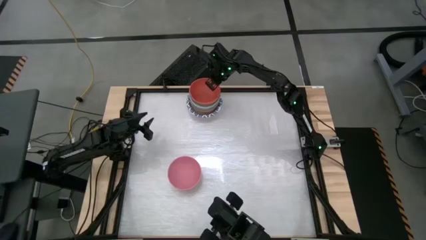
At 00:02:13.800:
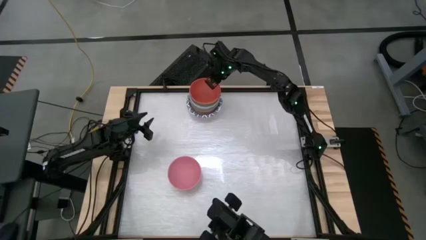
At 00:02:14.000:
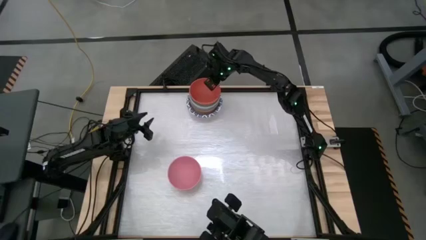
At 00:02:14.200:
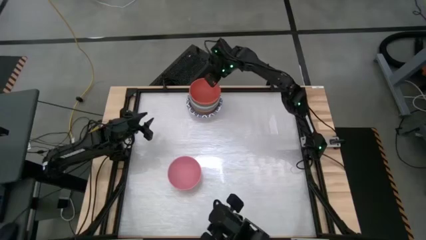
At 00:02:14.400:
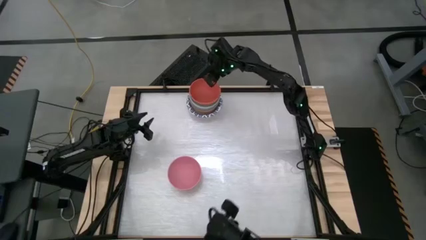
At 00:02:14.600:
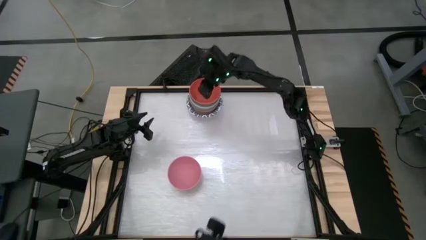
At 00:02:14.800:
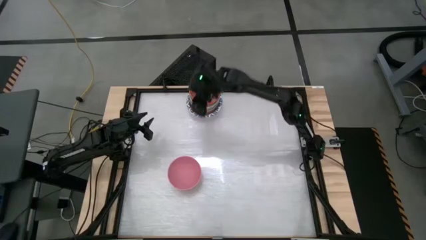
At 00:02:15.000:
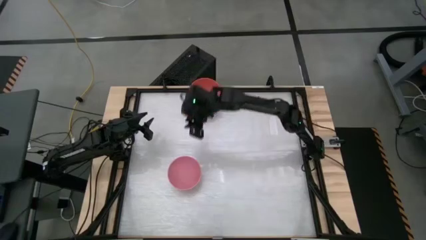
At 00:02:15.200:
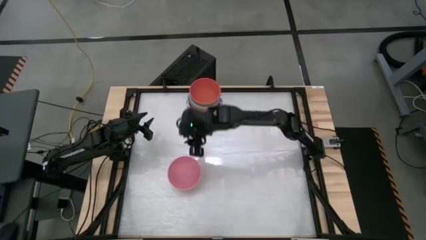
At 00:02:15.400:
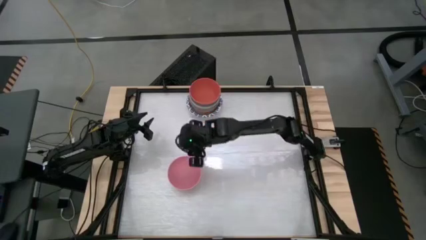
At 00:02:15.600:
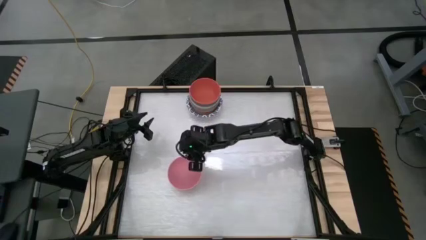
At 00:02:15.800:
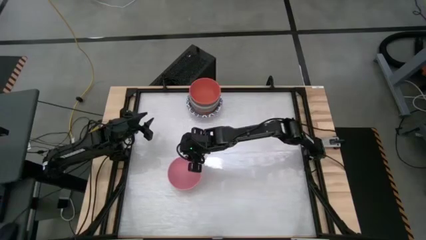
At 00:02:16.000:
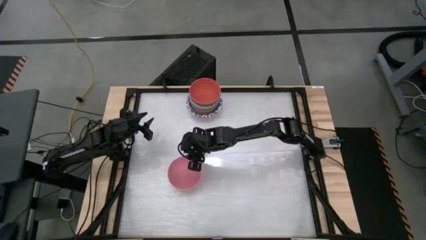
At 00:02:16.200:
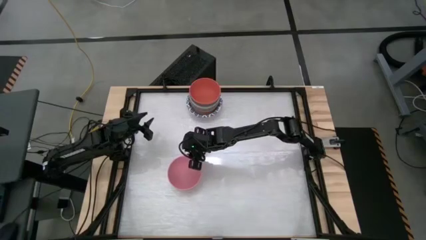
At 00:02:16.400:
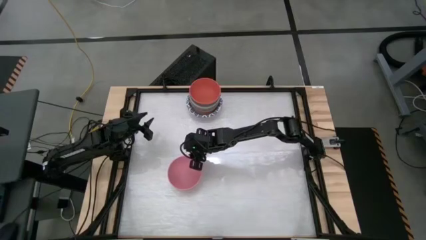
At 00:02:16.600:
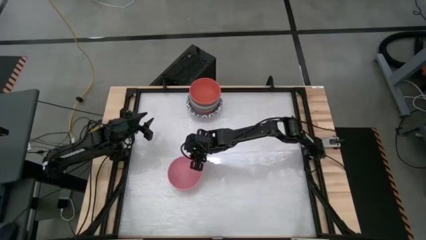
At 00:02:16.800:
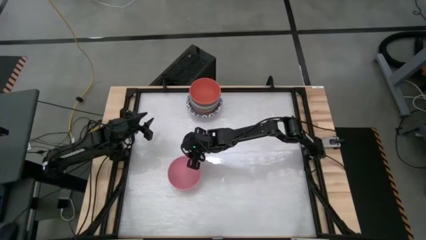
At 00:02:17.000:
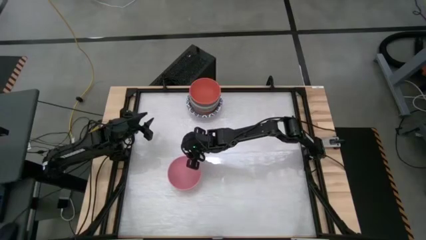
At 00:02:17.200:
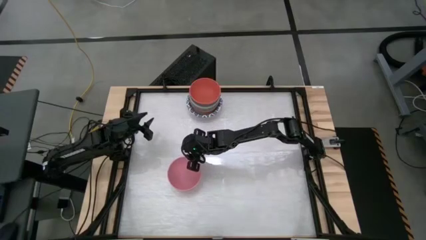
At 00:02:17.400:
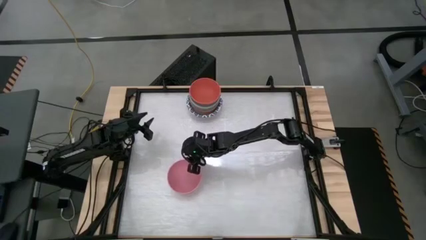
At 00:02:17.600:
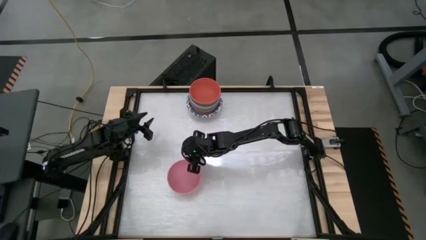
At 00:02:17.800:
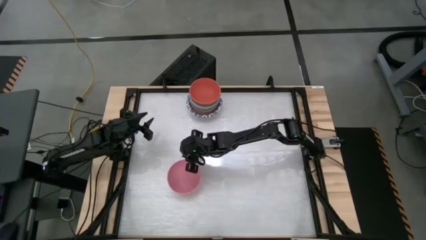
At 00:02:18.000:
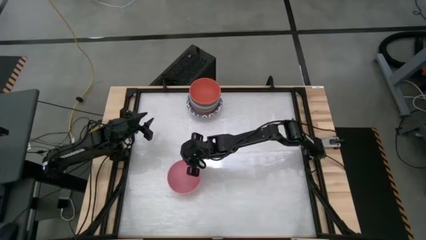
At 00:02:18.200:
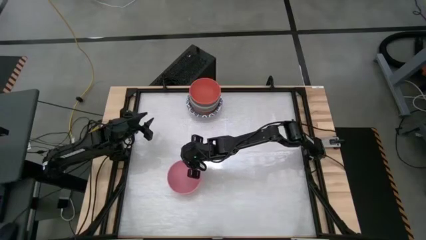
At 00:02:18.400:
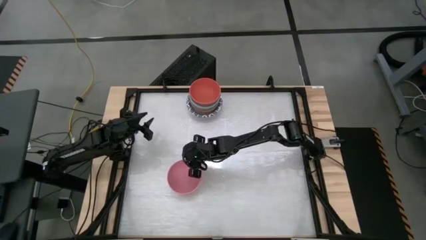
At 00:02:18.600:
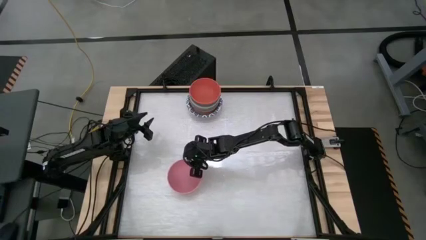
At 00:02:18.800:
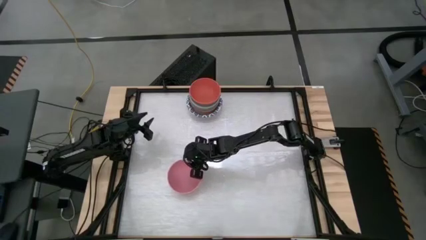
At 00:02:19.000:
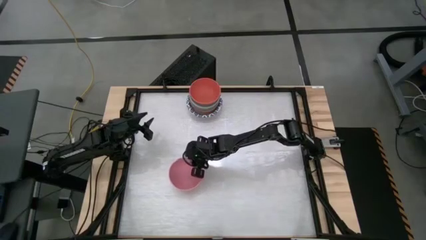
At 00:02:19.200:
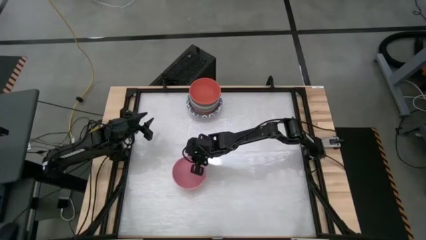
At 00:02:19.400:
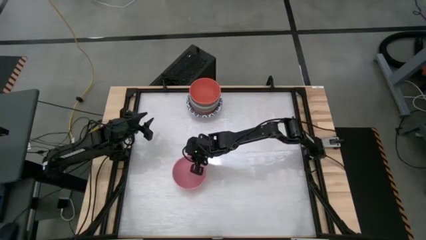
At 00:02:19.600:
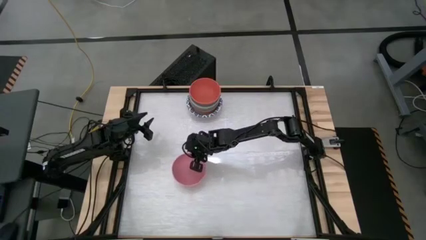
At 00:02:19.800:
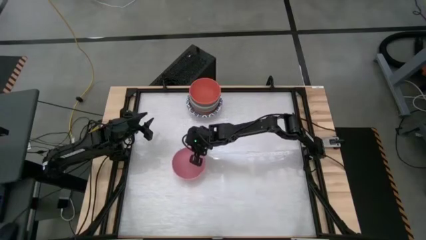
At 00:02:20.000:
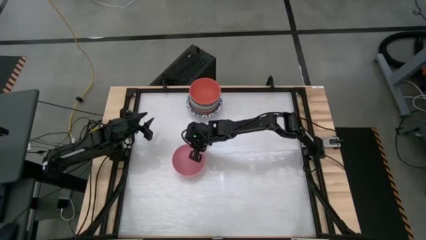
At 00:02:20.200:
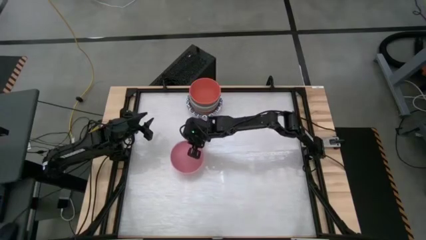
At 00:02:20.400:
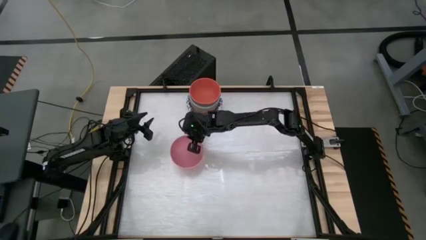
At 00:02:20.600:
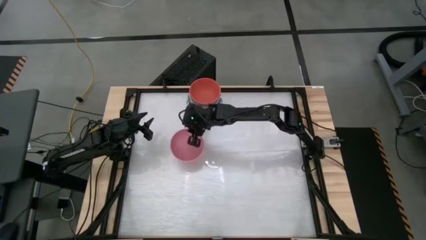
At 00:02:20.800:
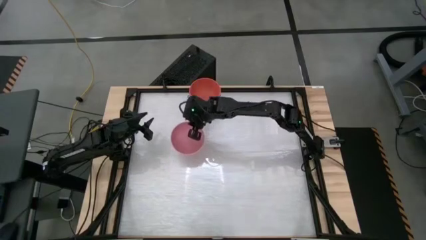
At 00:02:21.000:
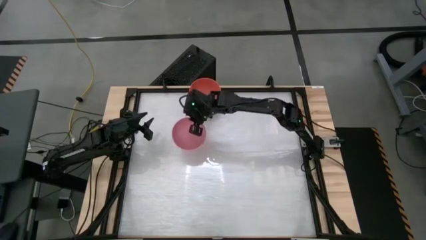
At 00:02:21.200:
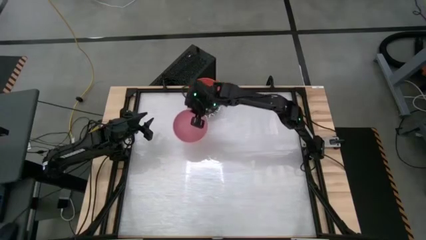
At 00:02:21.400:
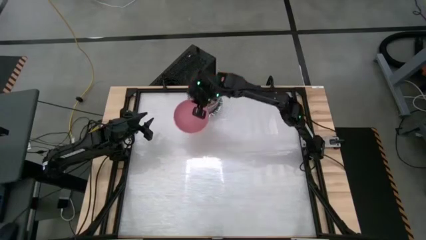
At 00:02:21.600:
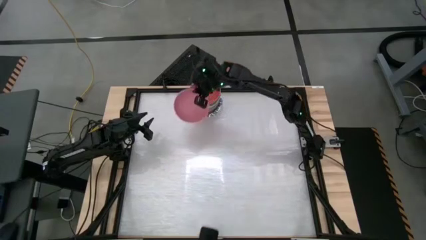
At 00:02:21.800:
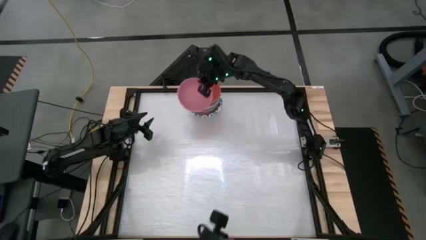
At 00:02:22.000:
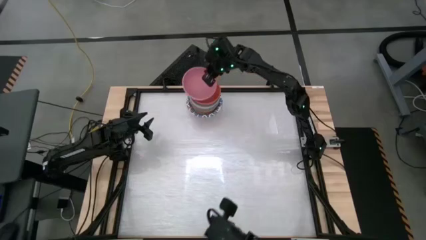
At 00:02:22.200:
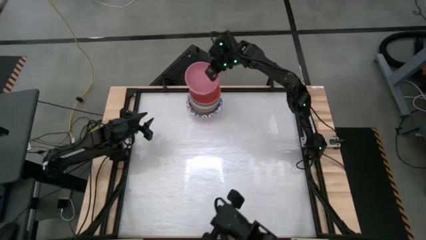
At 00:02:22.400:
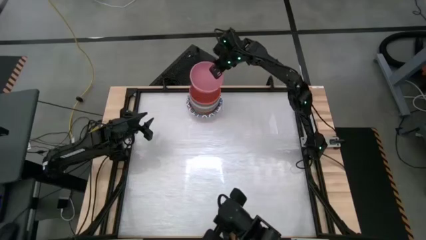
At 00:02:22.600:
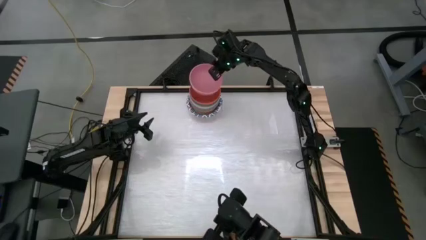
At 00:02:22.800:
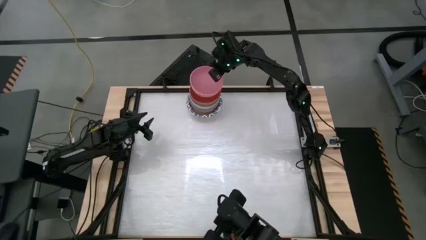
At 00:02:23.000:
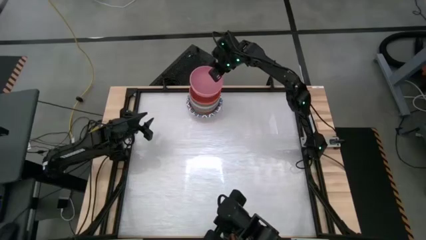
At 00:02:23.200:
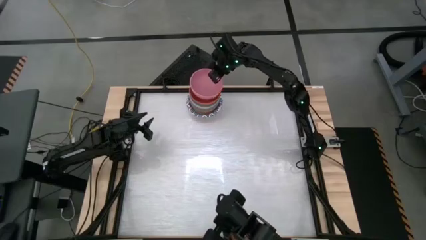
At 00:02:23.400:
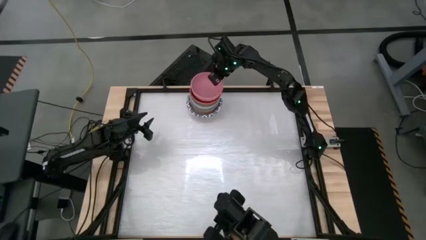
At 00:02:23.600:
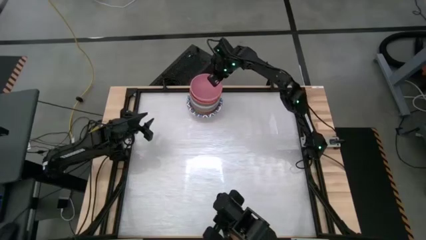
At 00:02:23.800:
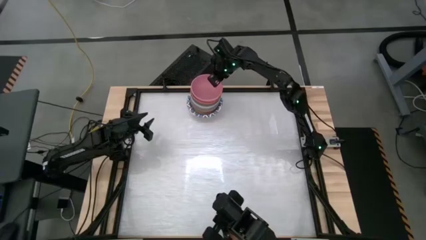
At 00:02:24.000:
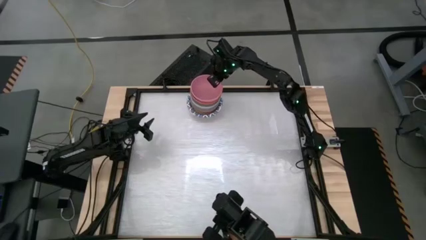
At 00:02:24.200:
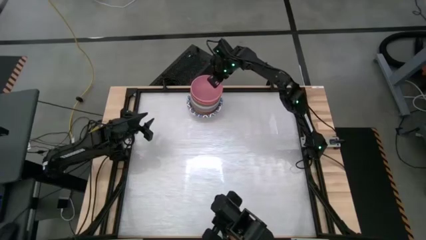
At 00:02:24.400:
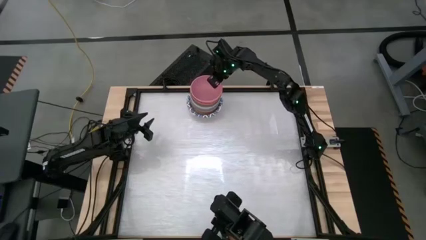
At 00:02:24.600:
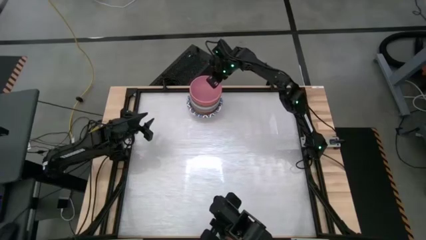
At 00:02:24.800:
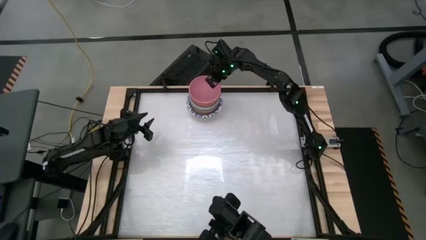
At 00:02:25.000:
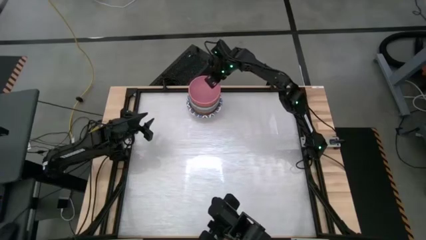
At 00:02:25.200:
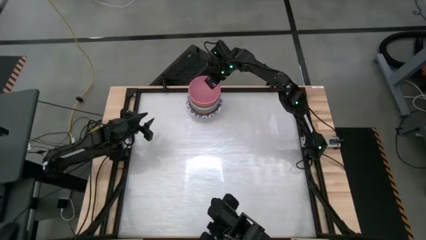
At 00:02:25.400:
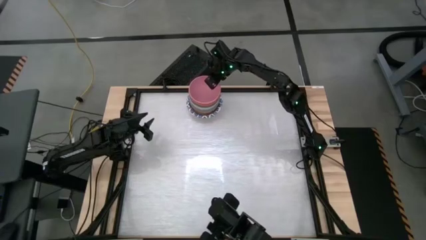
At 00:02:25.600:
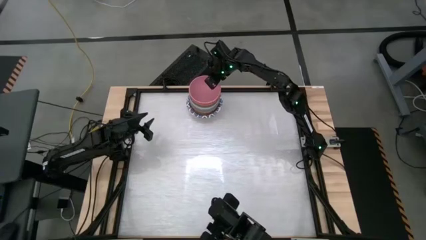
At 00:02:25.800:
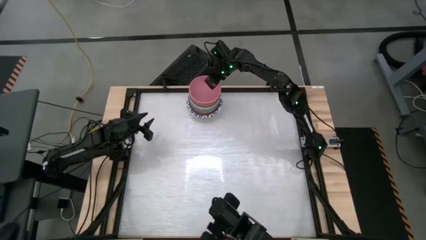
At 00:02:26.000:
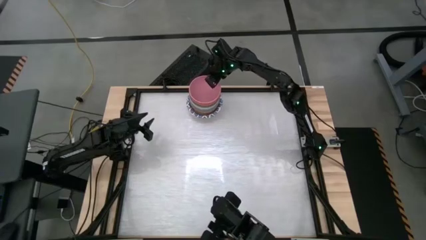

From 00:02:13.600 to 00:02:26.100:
Stack the pink bowl onto the stack of bowls
